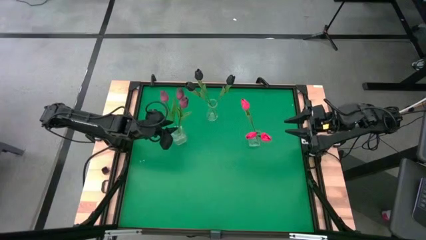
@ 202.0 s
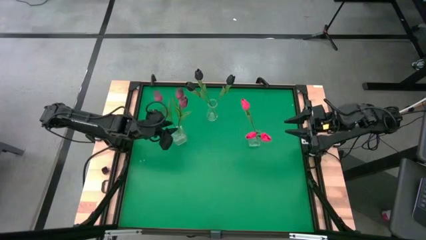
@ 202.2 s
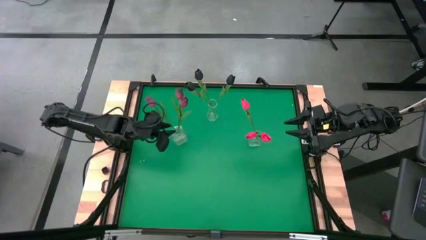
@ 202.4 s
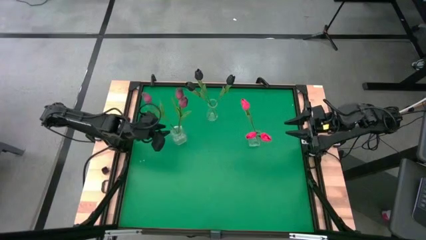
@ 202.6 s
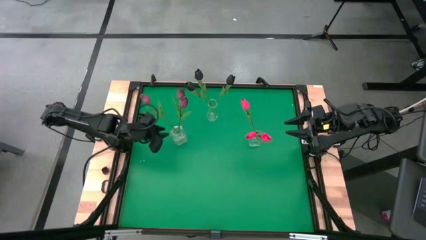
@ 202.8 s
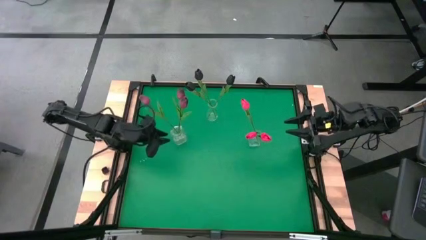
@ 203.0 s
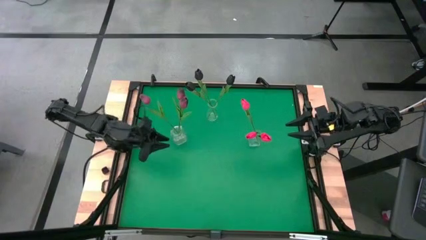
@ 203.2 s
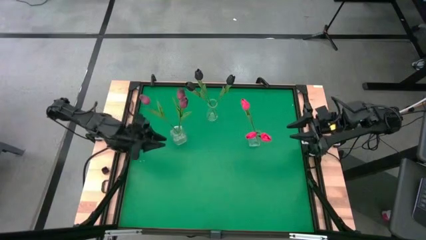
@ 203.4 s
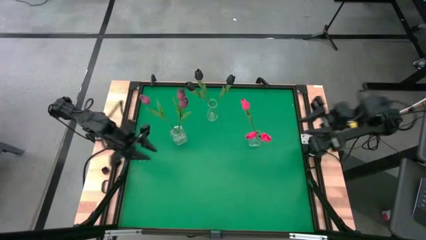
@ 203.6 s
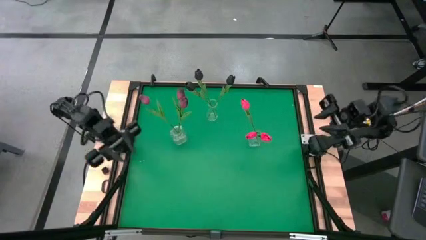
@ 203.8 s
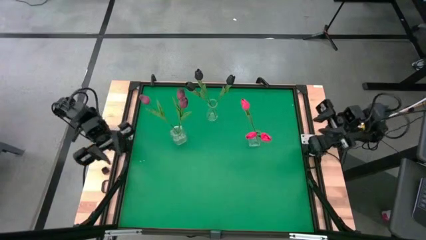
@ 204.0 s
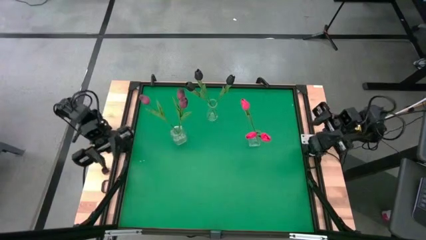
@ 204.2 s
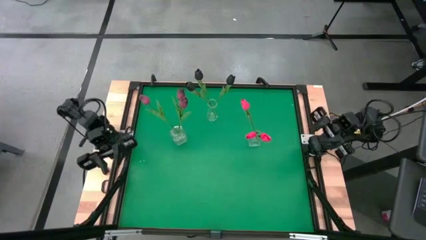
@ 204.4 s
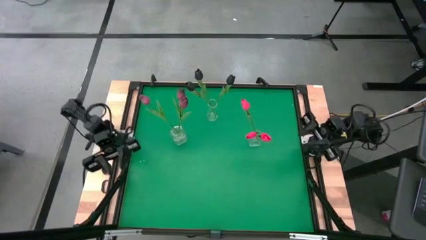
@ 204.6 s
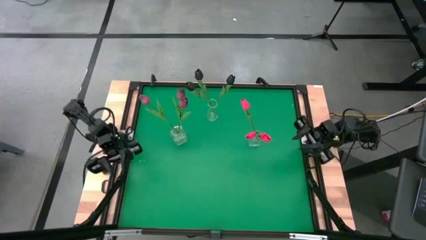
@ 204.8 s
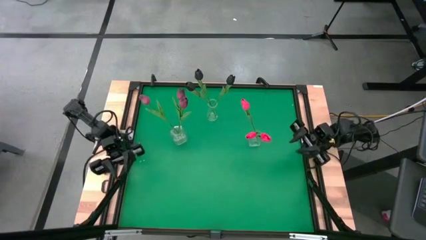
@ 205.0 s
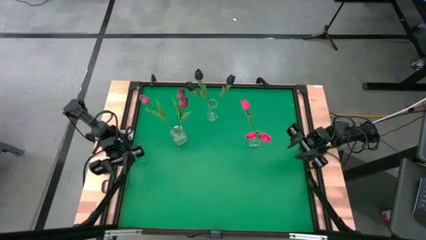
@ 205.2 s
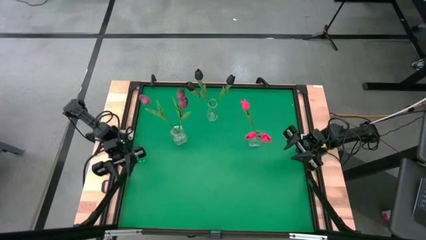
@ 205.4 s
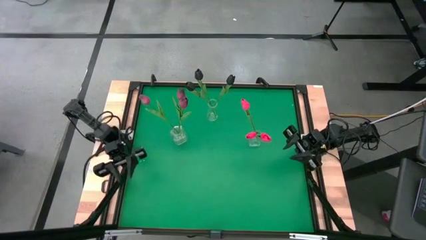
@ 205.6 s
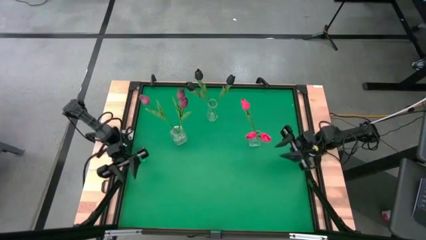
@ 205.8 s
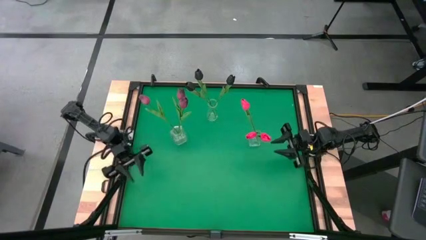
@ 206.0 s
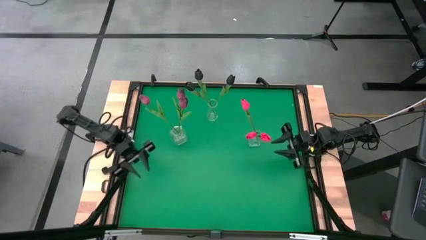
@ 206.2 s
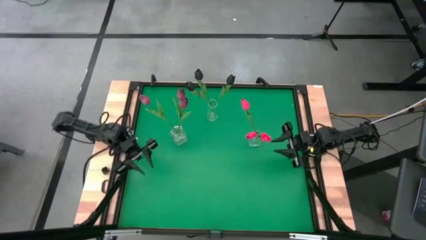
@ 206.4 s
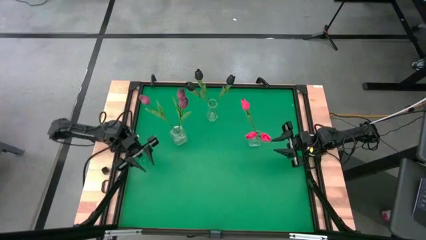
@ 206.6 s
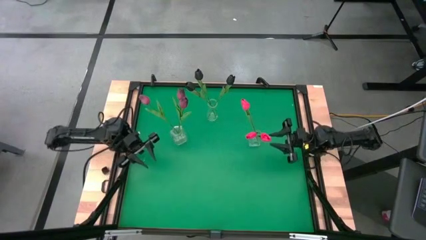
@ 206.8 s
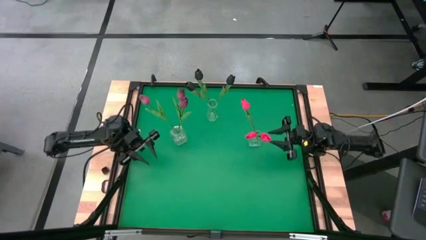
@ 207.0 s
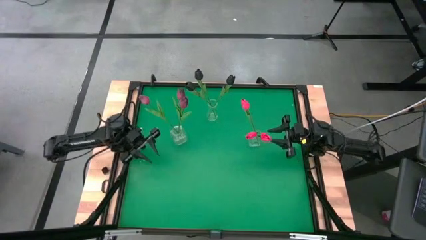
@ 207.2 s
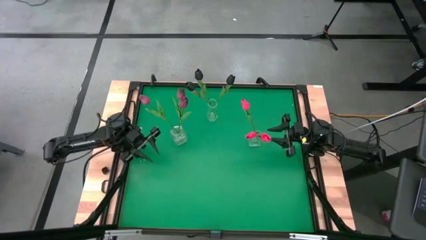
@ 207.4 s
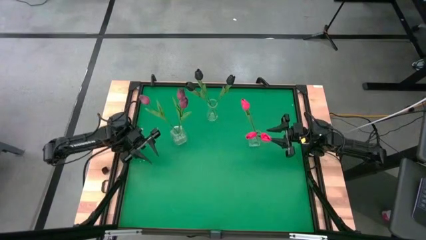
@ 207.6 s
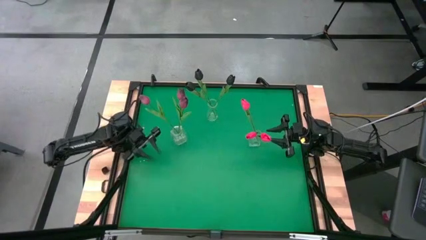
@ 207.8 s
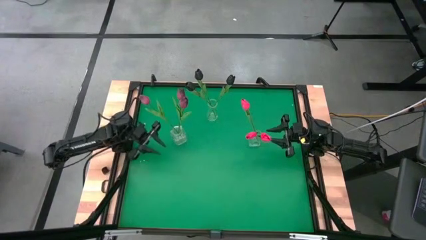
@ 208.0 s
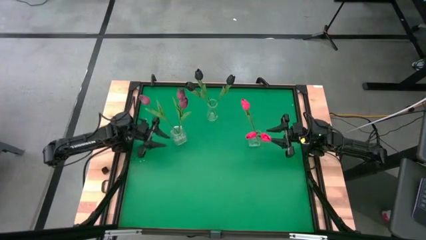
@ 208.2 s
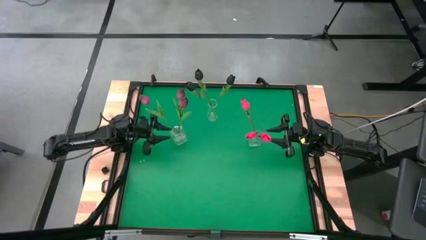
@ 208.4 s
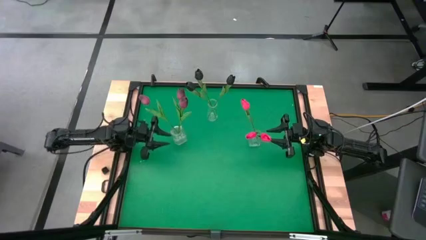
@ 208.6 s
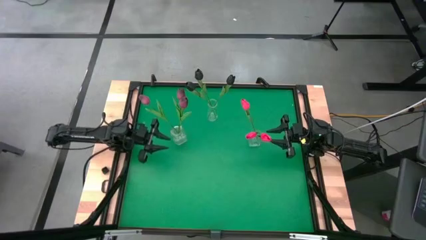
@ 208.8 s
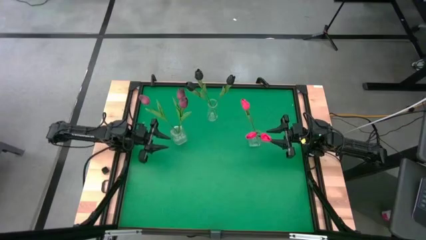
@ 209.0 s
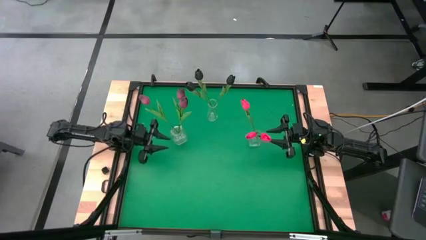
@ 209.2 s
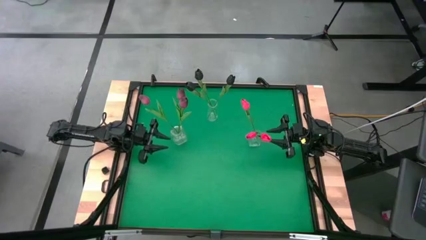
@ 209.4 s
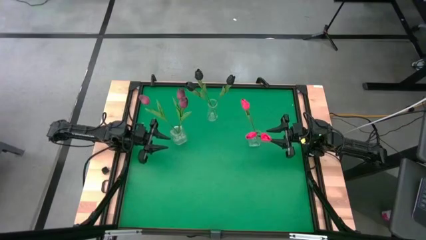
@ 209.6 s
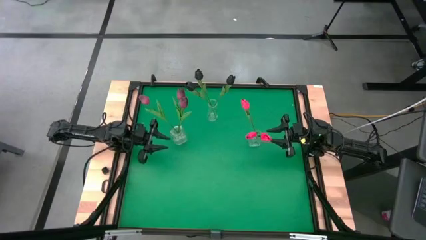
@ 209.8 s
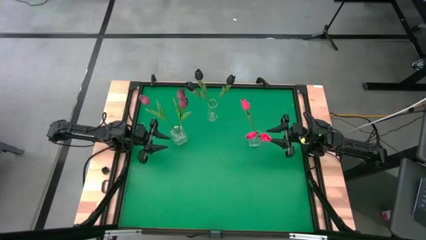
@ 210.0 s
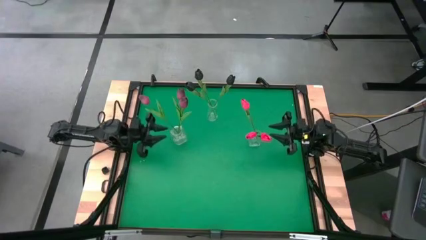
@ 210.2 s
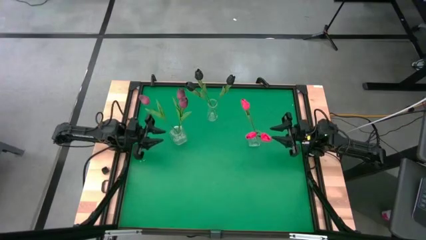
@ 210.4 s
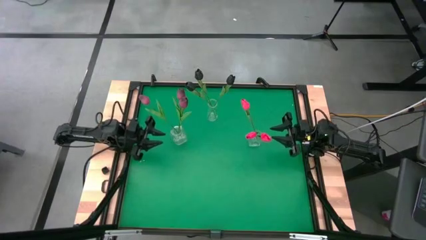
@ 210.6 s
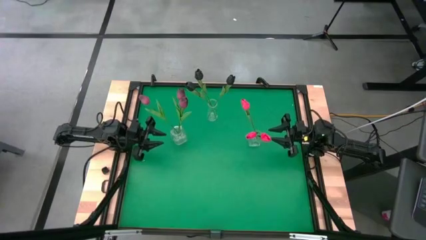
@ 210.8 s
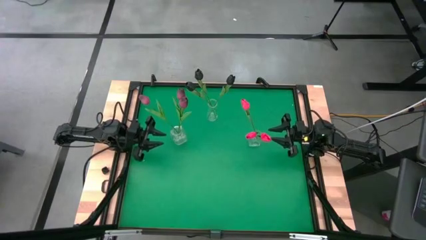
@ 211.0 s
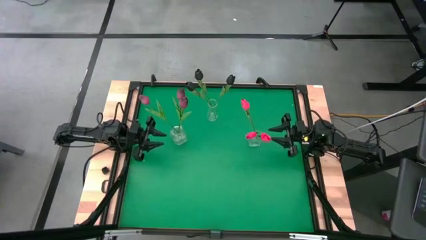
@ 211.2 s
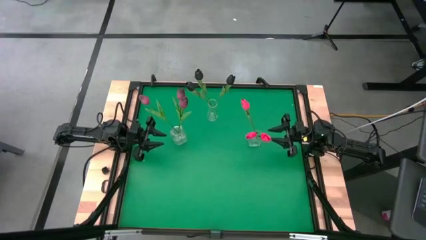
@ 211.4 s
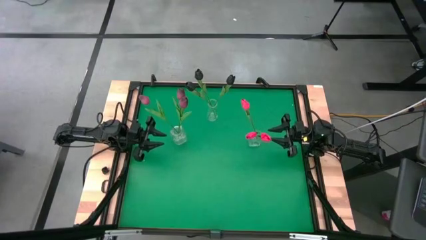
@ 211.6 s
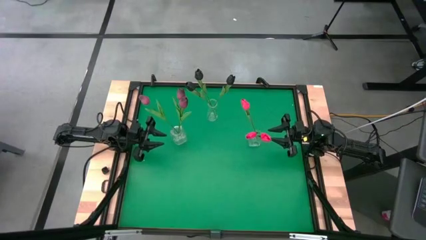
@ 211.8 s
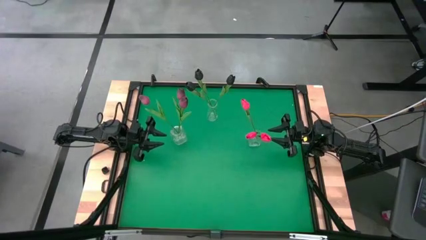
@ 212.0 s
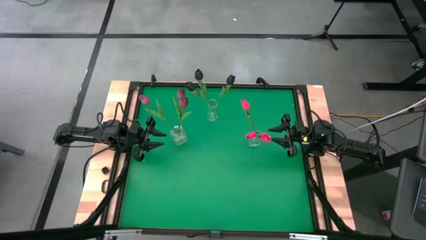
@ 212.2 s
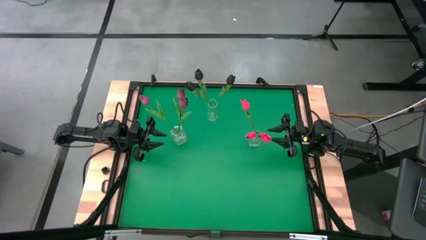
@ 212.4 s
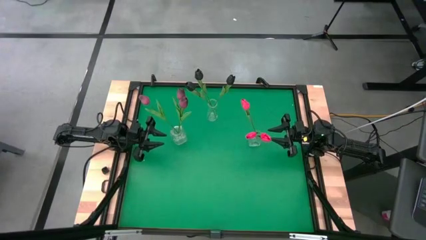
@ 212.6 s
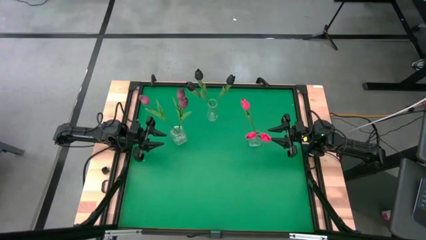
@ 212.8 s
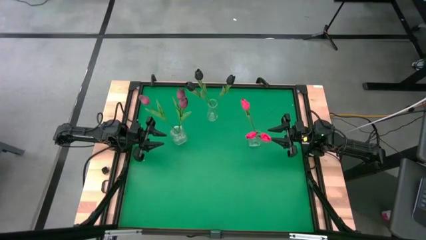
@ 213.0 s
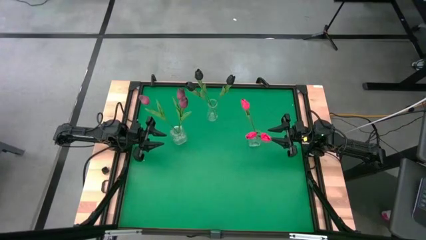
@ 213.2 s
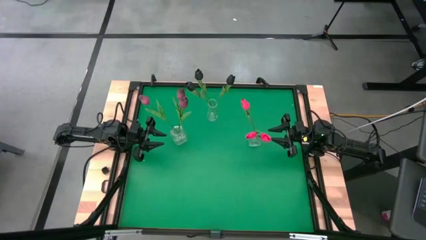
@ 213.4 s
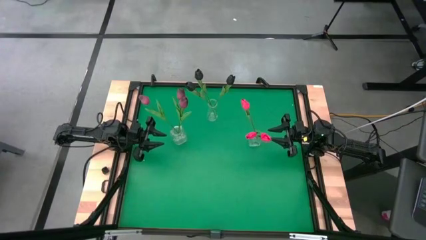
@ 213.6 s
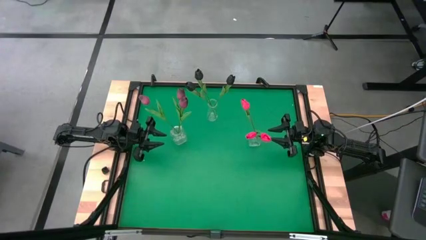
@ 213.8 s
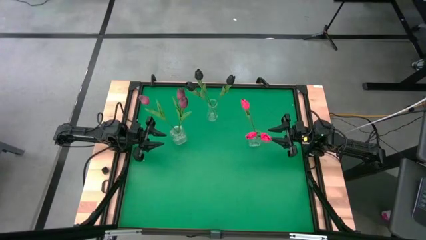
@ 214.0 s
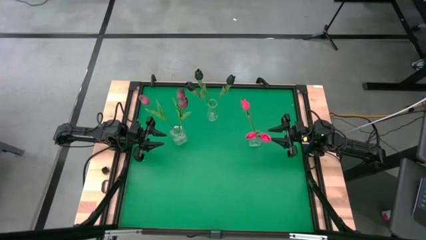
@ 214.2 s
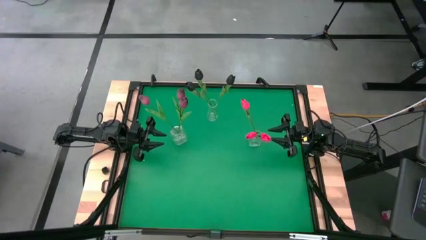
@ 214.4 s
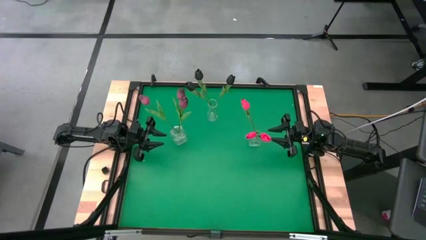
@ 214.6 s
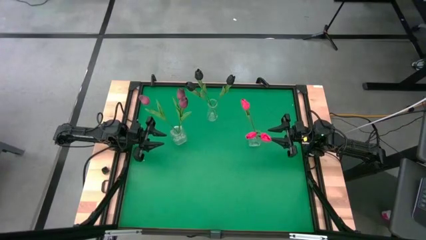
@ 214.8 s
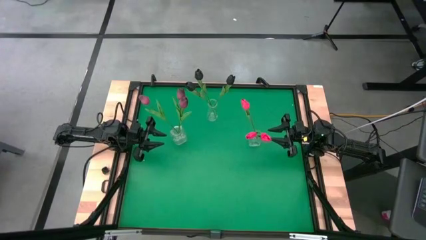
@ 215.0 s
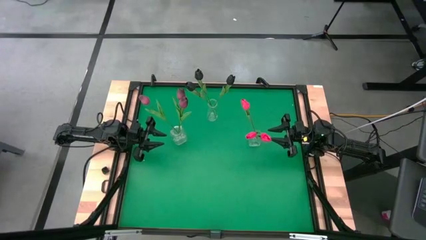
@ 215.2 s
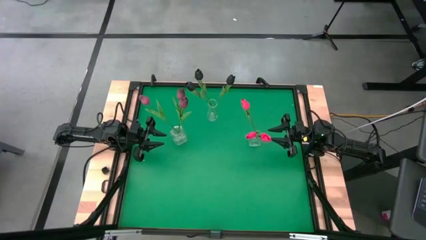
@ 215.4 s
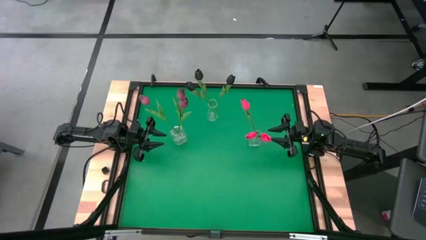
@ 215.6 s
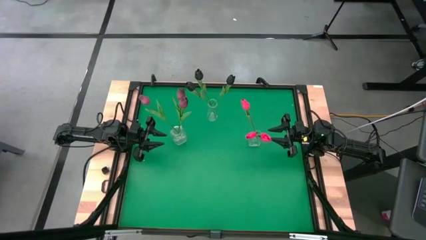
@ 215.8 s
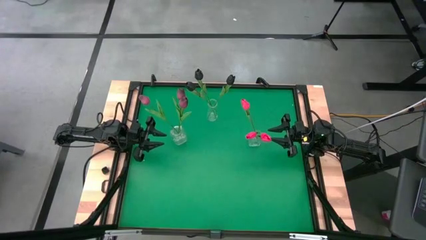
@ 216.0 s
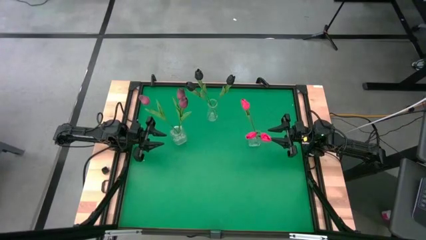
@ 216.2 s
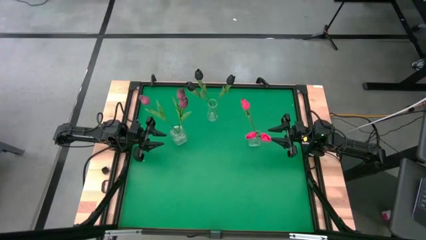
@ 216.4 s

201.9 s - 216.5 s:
Task: Sort flowers into vase by color
Return to Home Position
